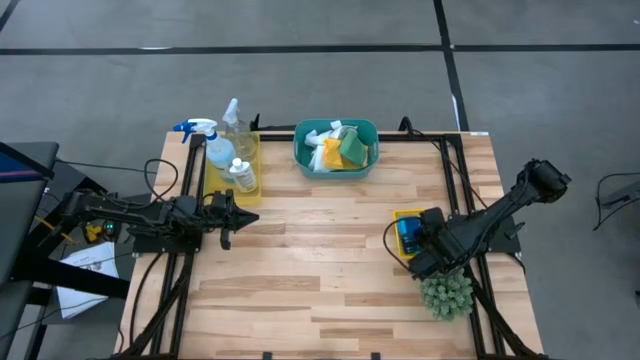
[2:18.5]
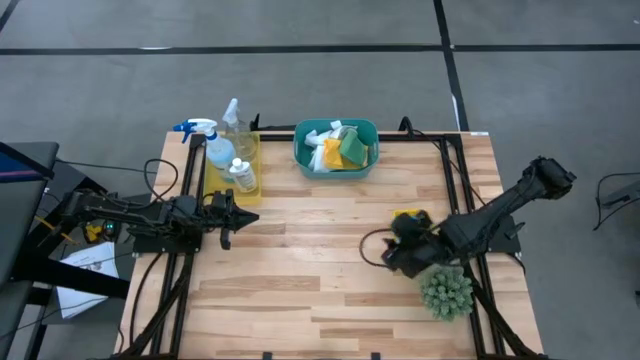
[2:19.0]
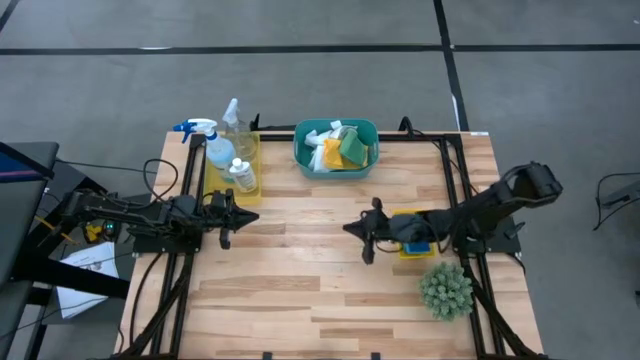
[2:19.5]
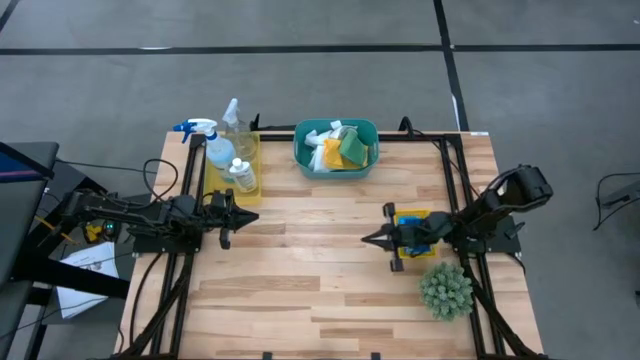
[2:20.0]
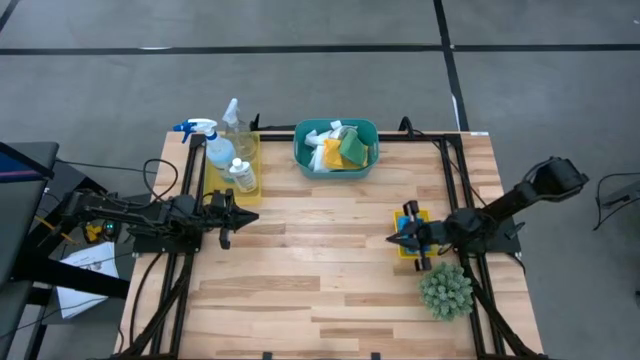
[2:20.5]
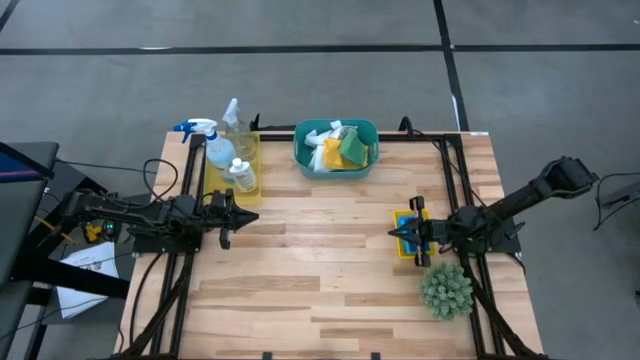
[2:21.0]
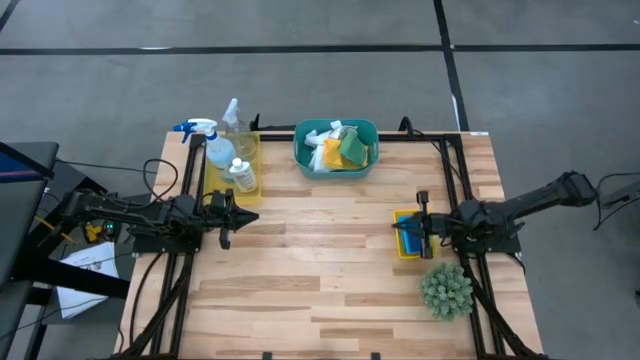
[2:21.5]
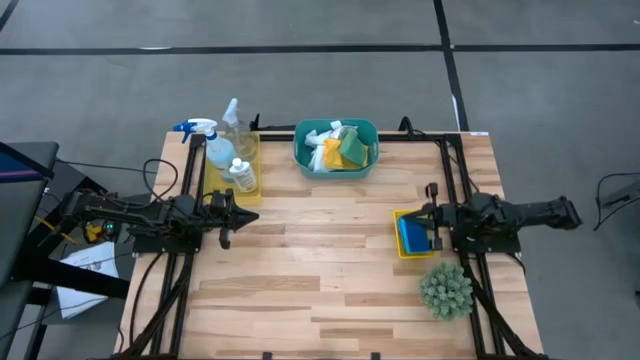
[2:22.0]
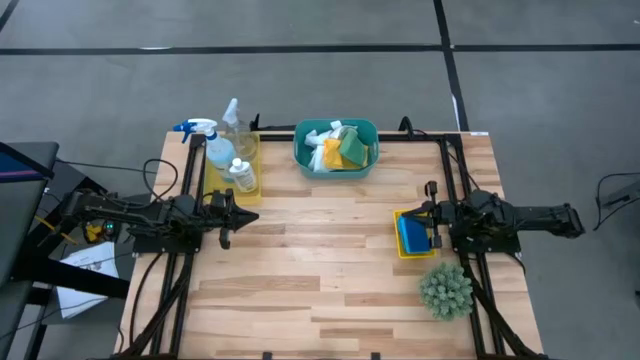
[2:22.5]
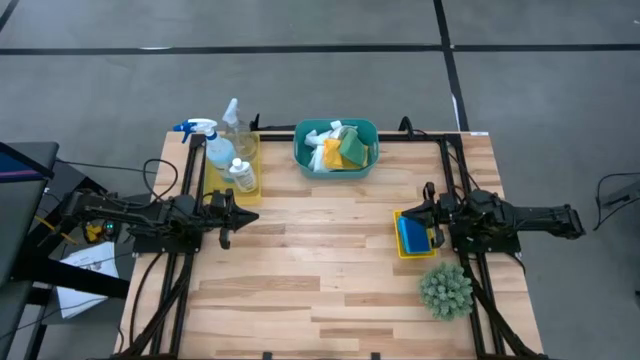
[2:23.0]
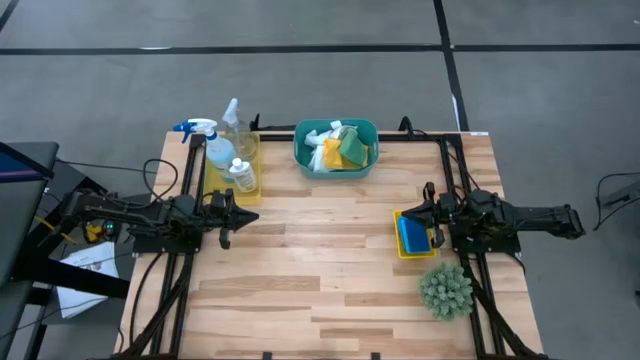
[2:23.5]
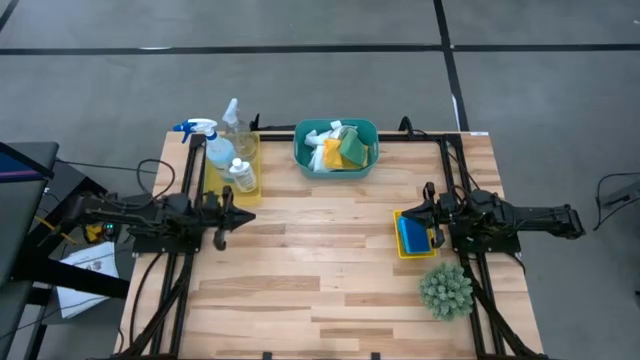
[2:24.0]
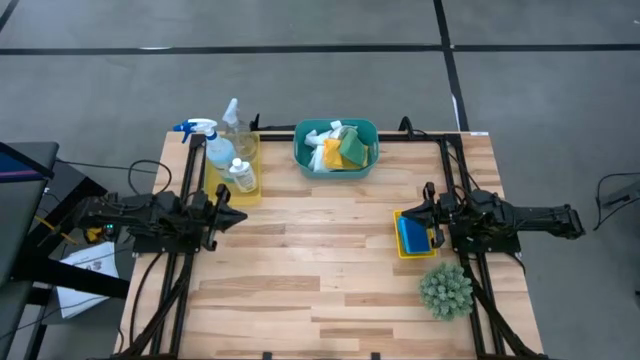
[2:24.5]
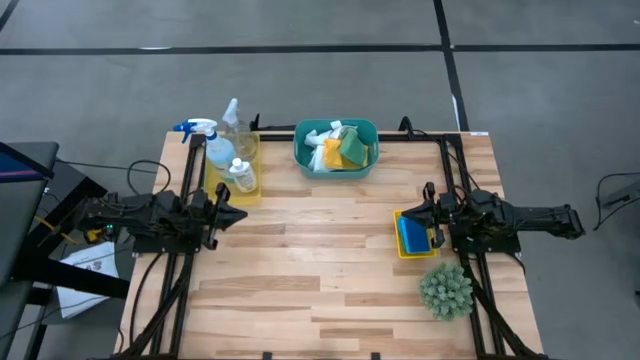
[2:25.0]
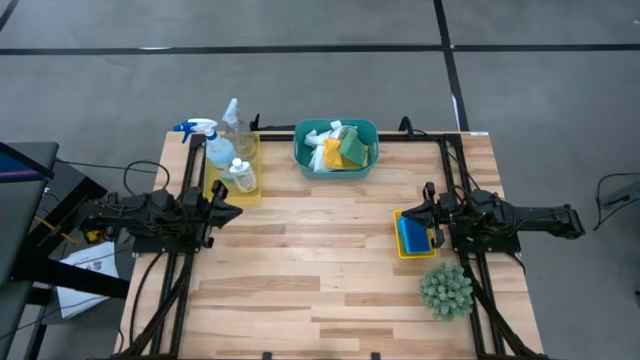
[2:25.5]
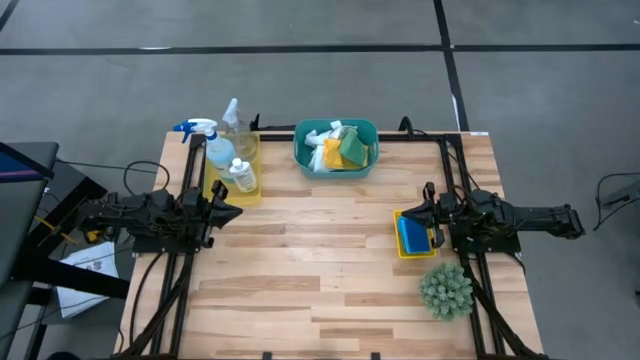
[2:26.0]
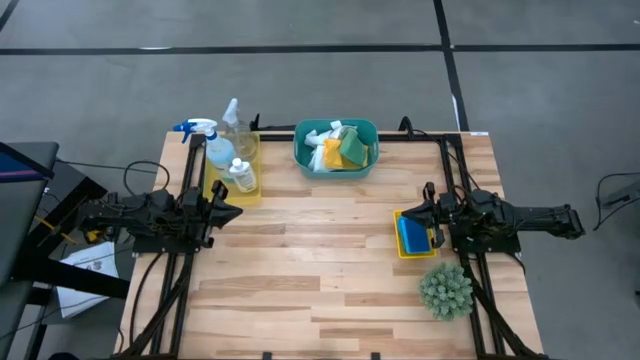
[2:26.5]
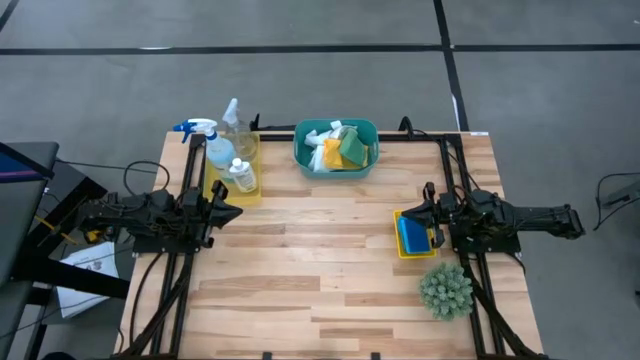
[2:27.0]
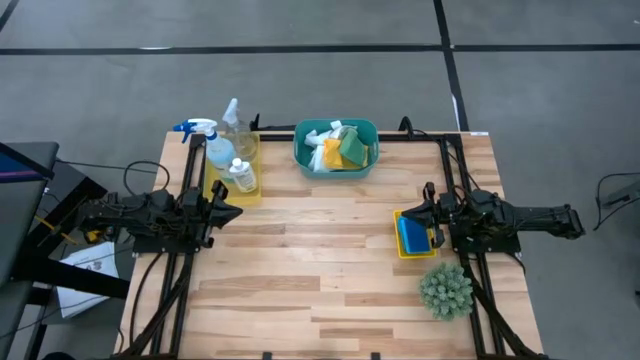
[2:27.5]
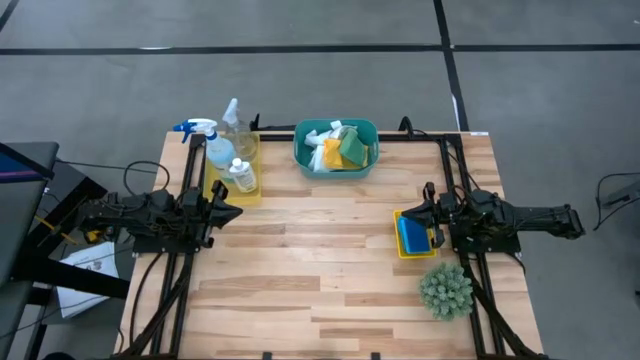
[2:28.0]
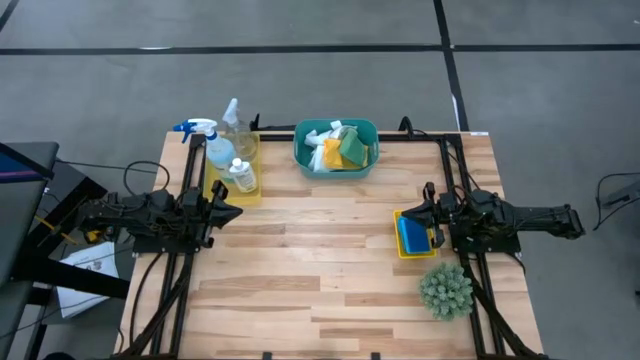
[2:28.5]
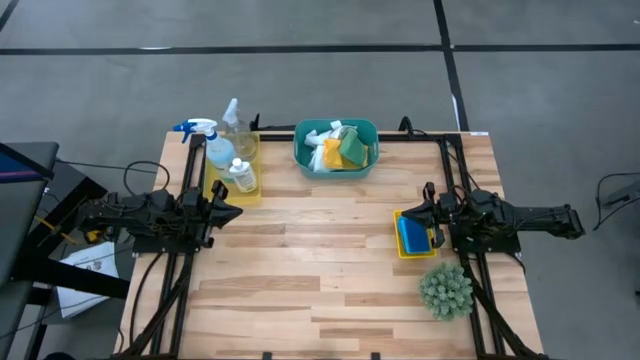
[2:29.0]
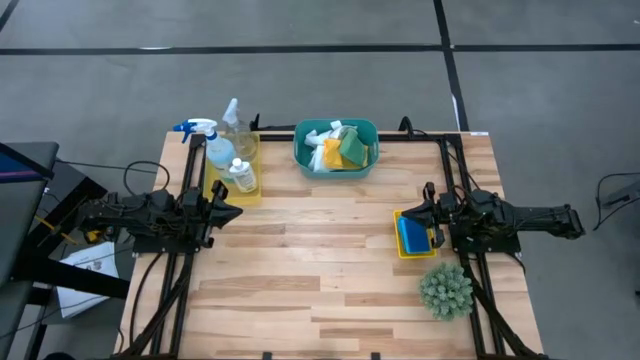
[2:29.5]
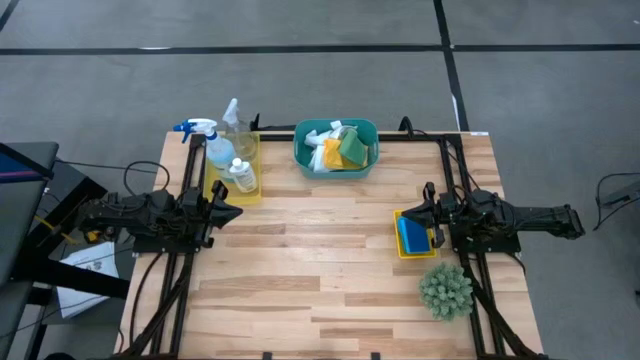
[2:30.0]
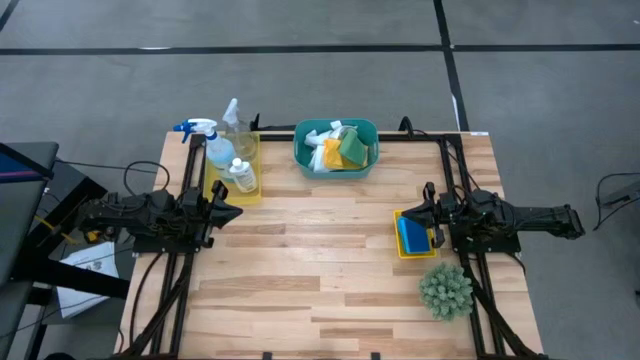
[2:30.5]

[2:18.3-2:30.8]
Task: Pick & Place Kitchen Items
Return to Home Position

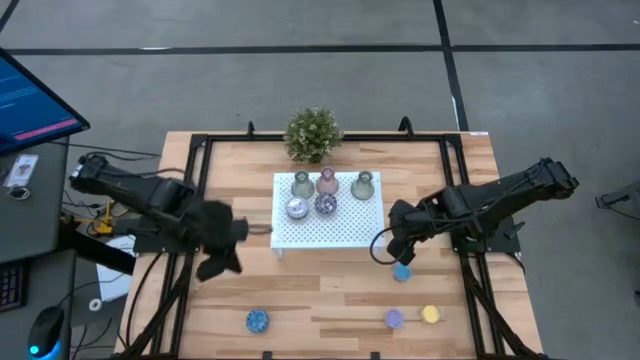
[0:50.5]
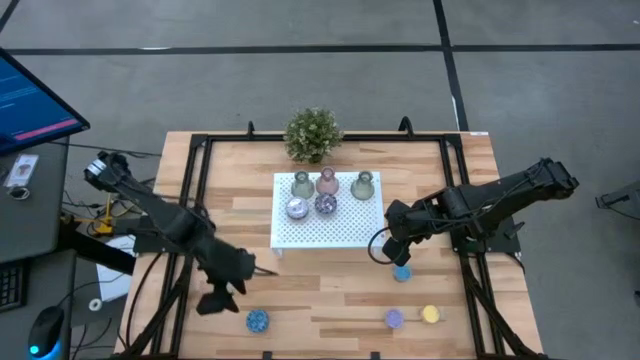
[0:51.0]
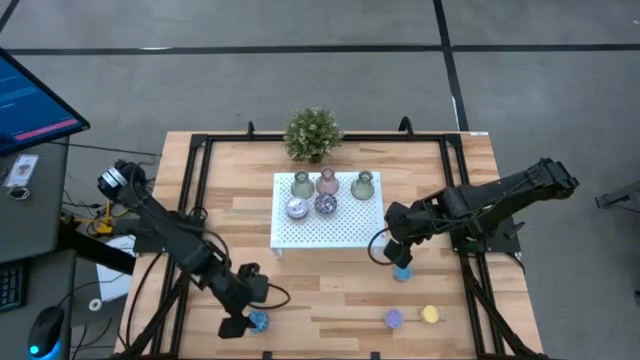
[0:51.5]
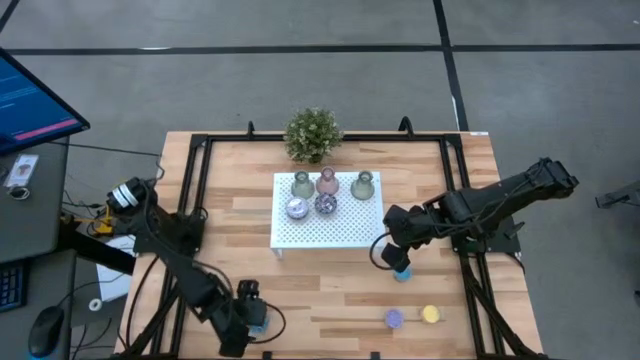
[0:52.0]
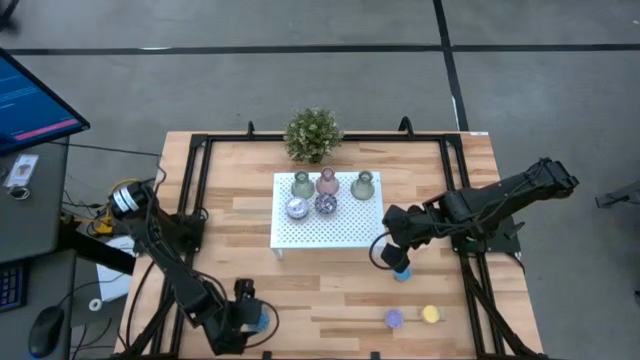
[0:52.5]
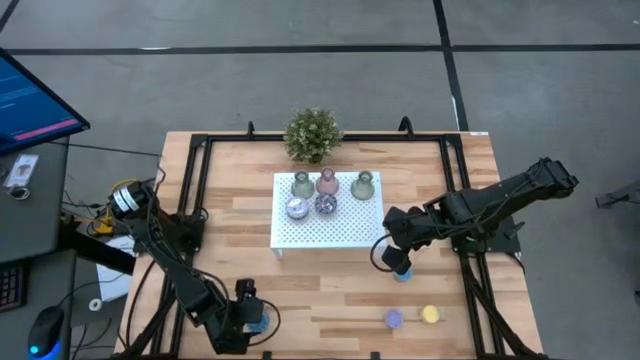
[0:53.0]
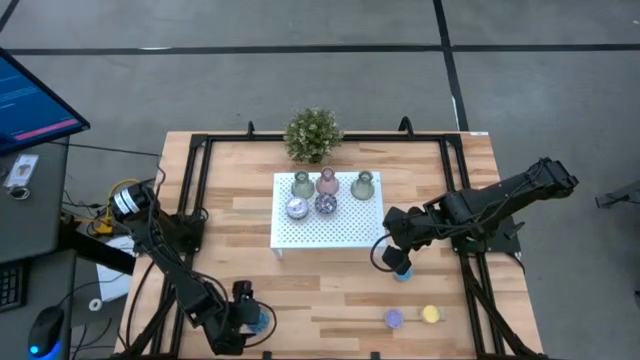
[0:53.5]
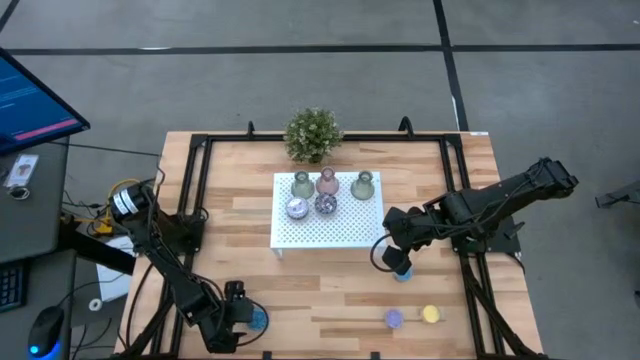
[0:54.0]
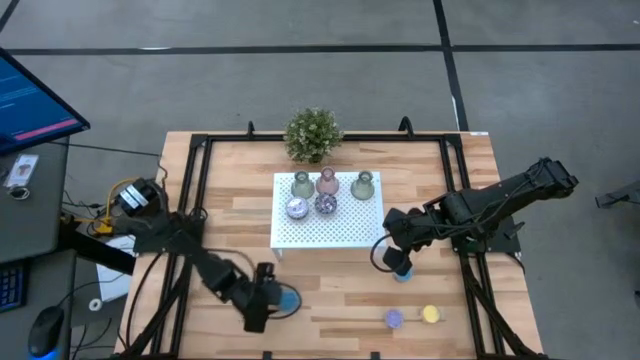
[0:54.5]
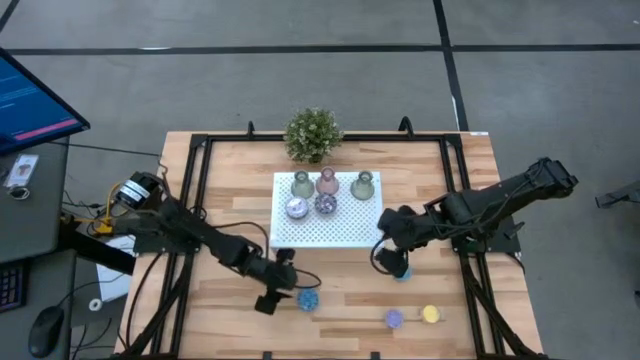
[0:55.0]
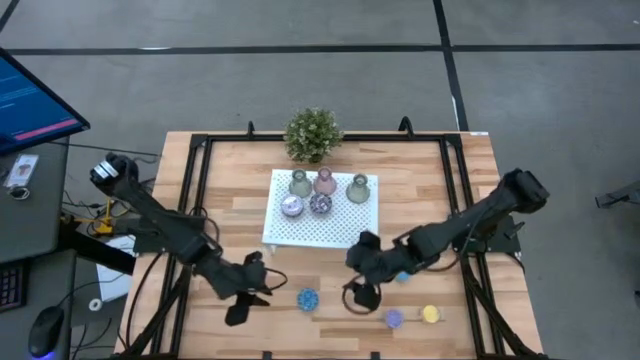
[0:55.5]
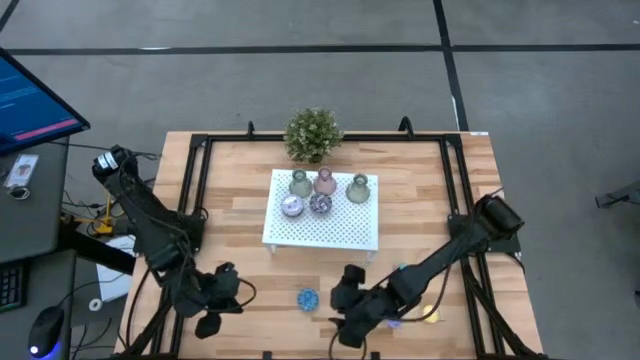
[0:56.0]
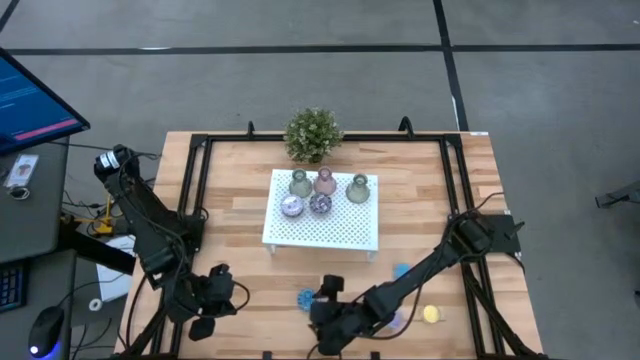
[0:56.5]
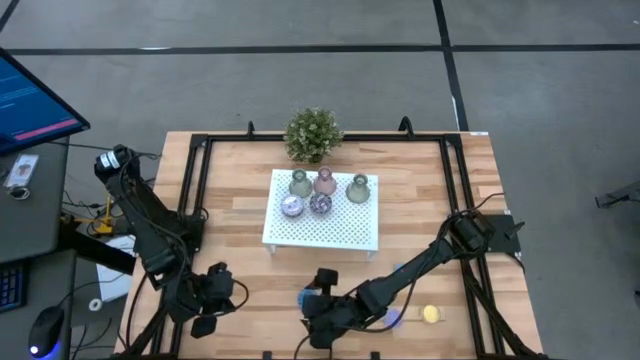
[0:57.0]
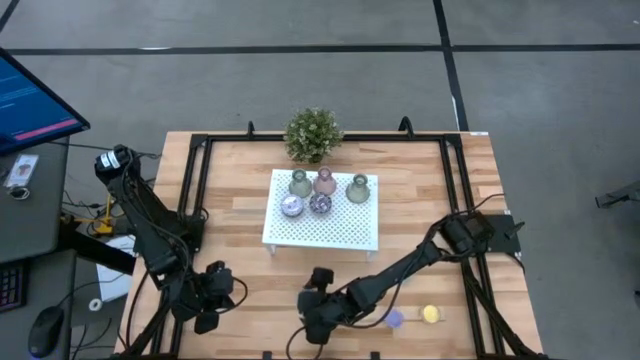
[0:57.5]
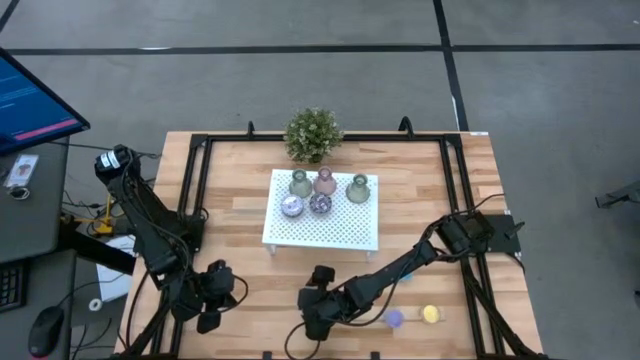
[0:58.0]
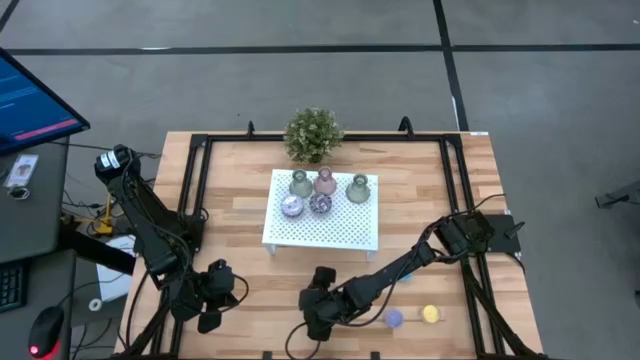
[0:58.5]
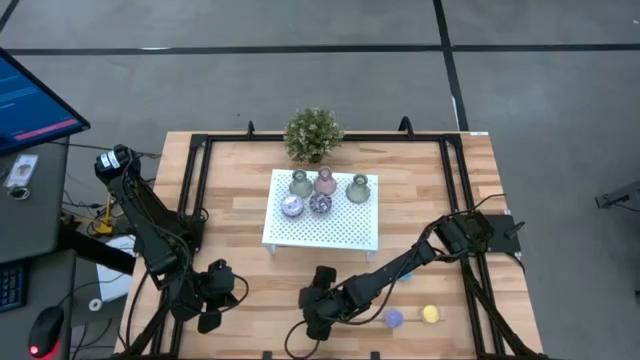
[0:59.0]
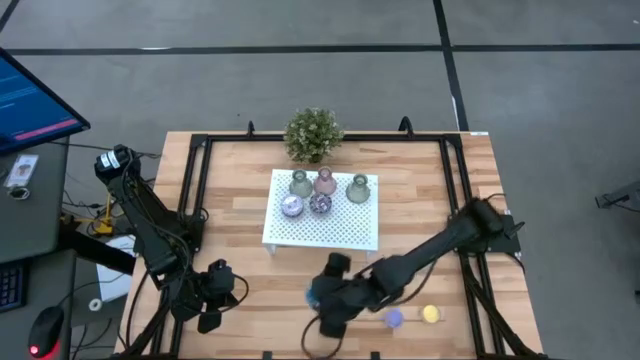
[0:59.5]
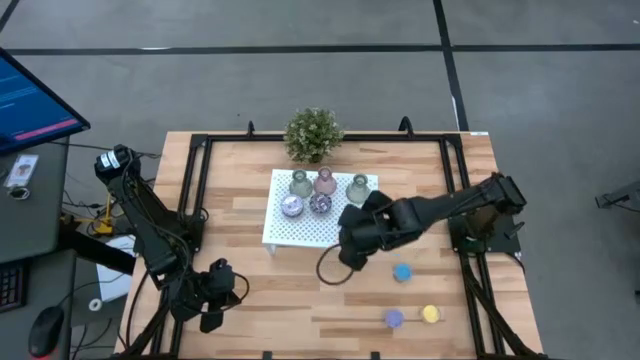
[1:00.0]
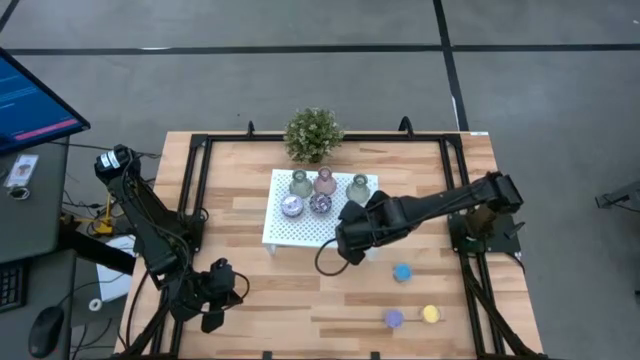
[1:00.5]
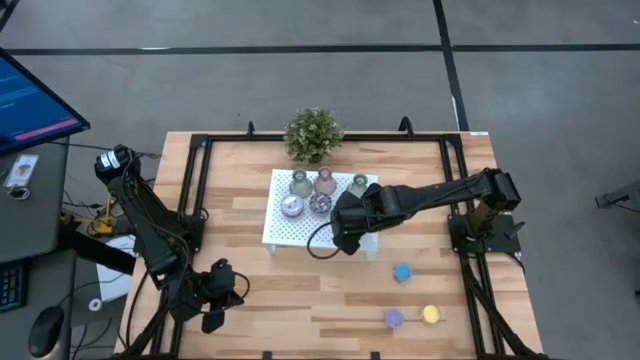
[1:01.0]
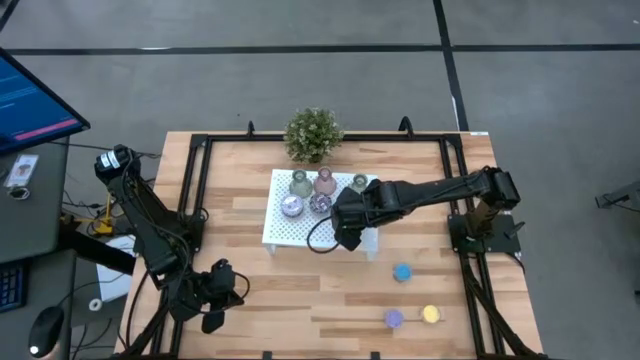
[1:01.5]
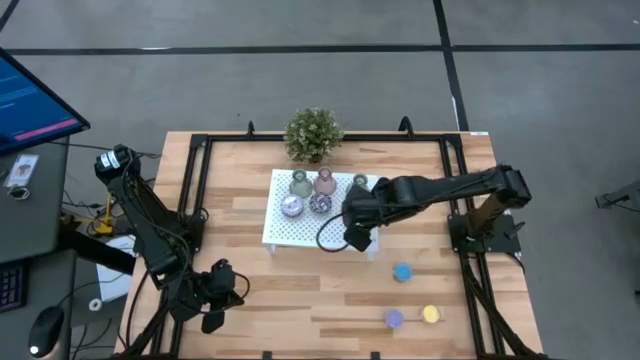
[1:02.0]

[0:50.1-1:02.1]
Task: Pick & Place candle stick holders
Put the blue patterned scented candle on the shelf
